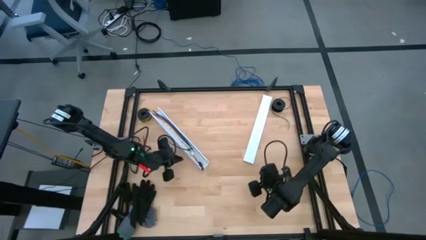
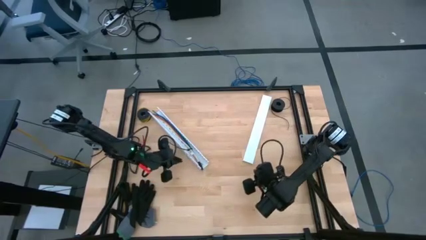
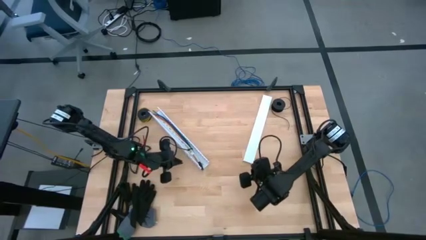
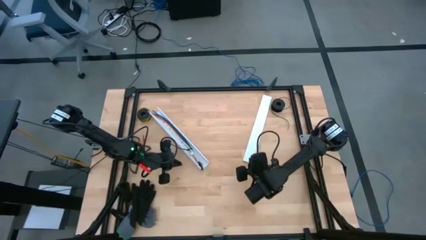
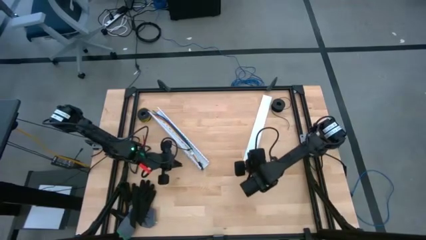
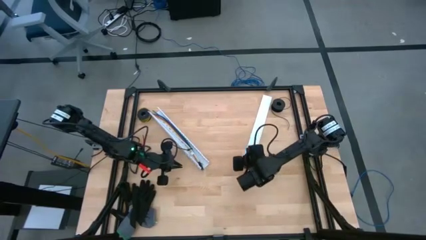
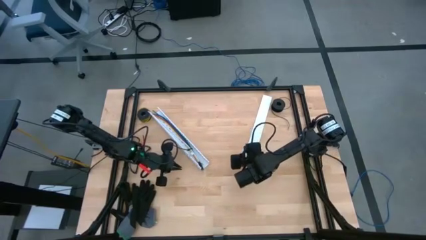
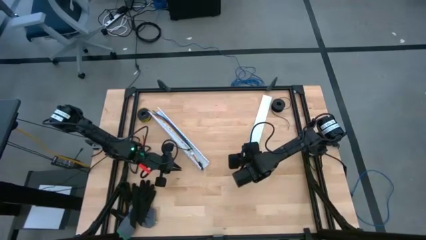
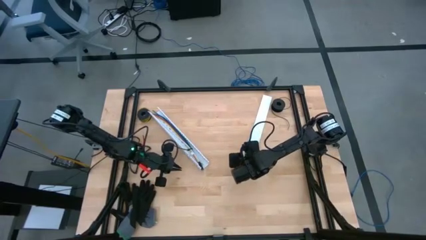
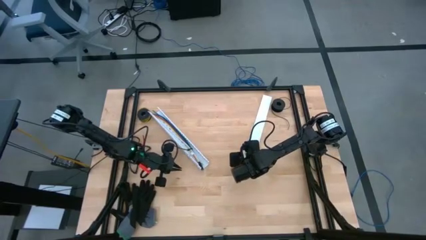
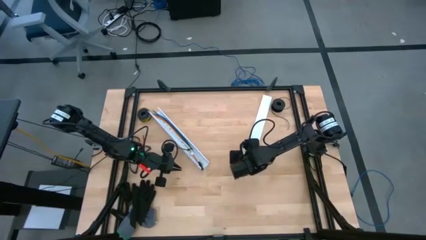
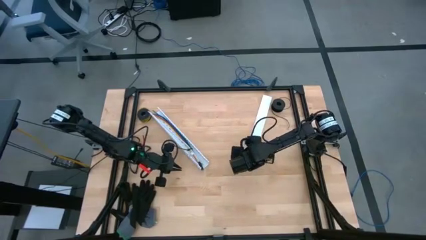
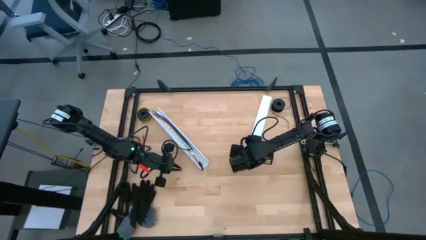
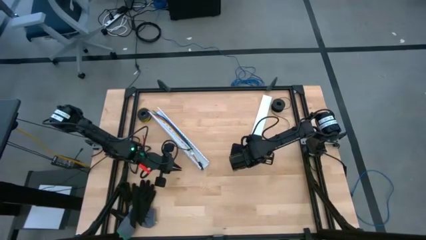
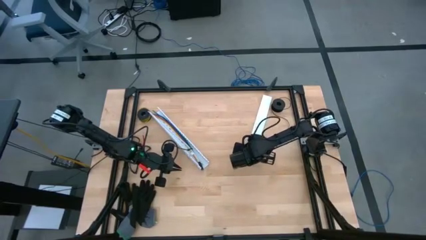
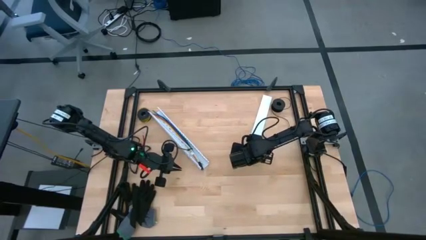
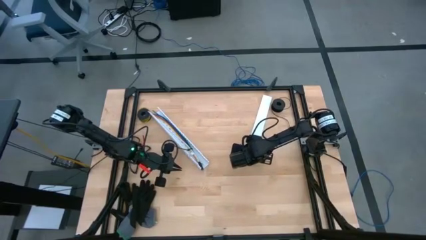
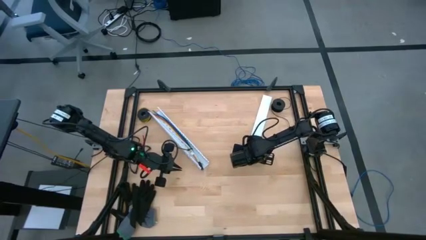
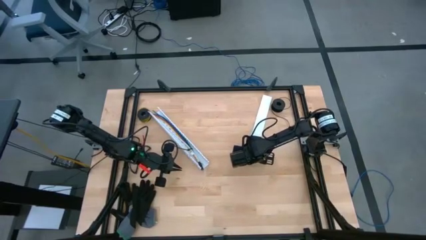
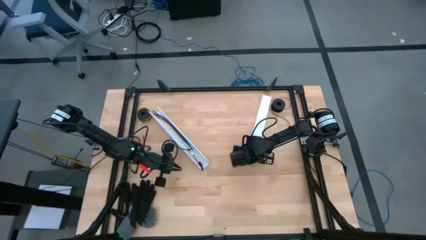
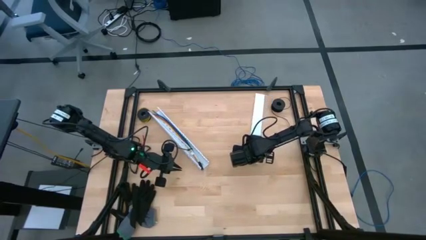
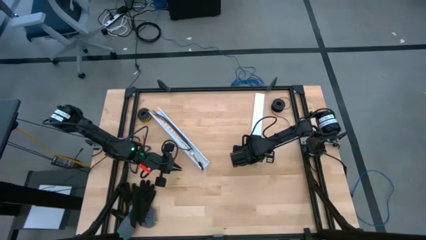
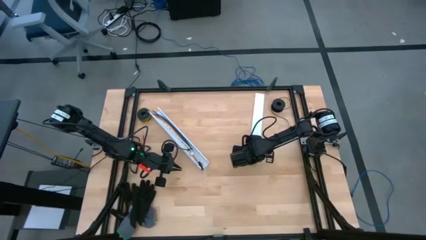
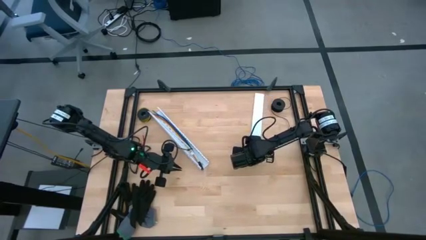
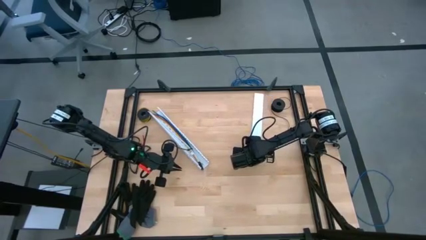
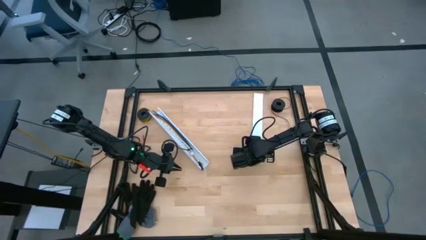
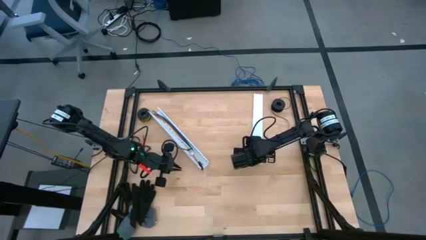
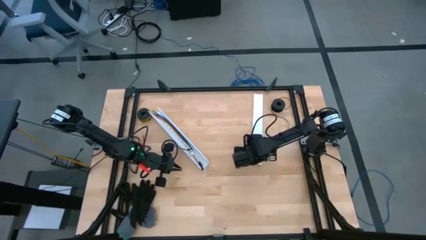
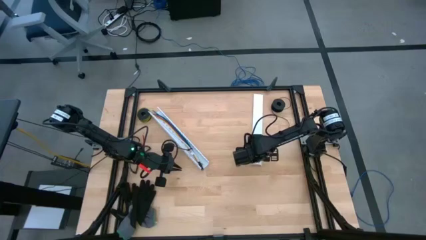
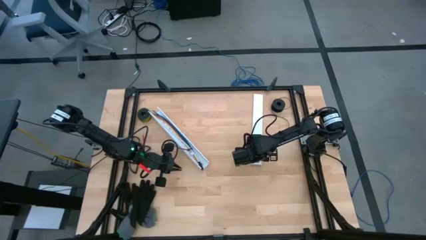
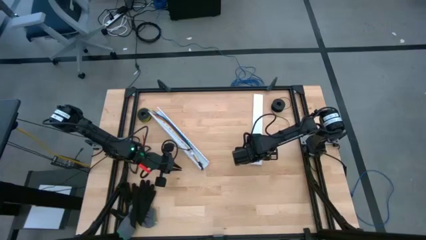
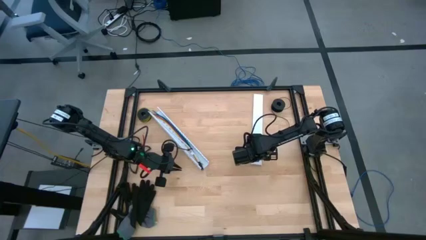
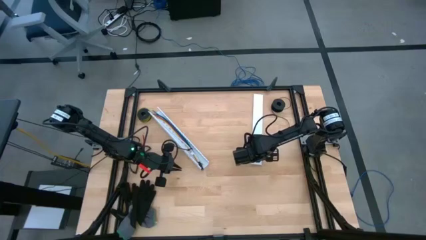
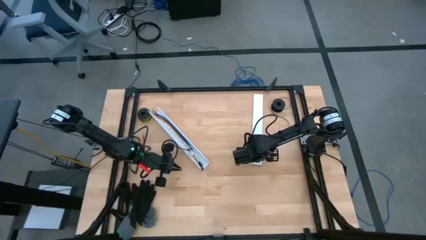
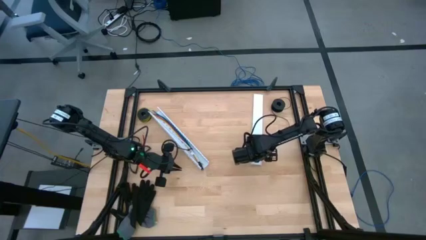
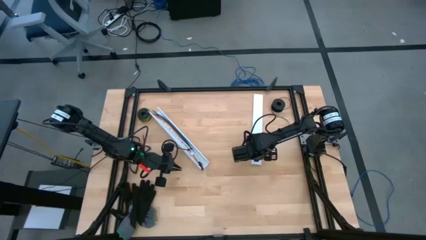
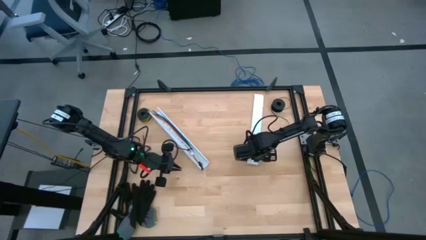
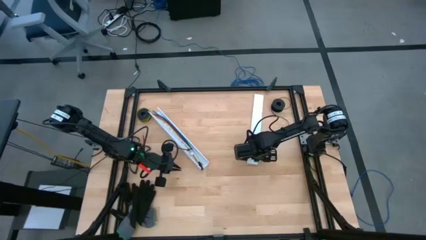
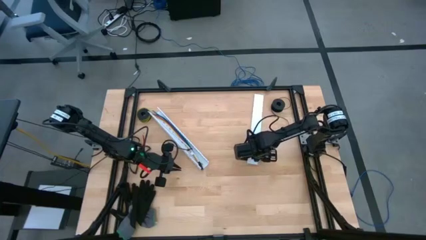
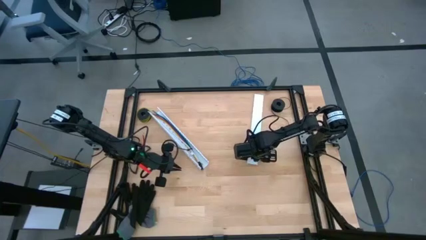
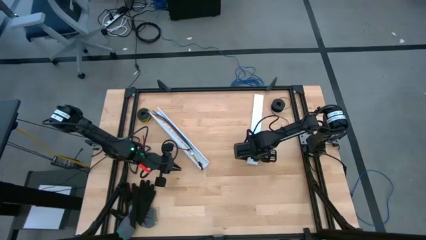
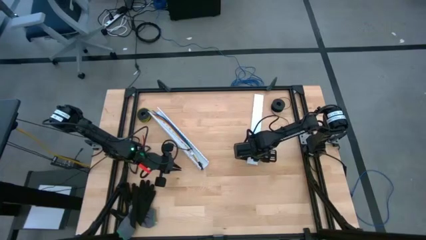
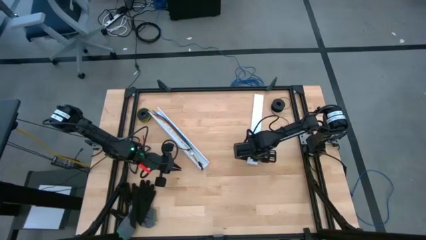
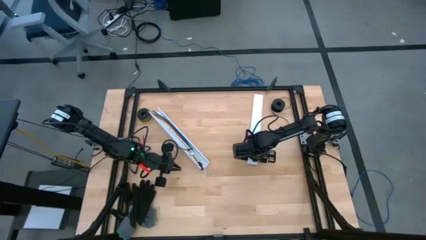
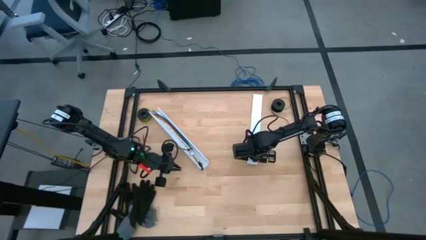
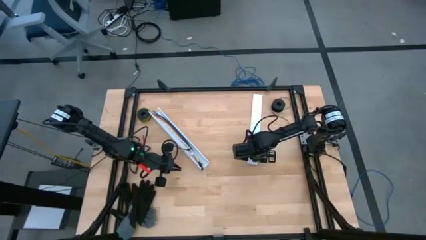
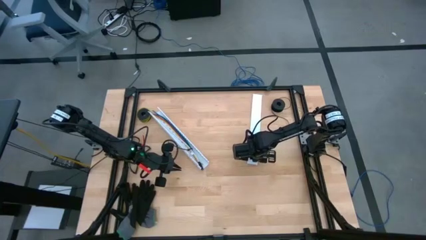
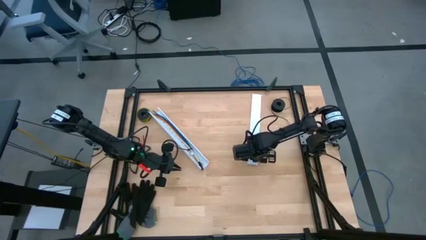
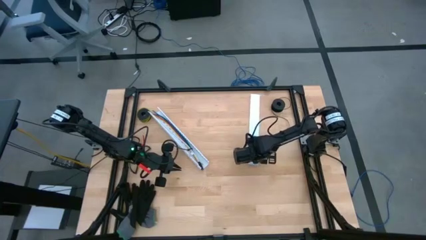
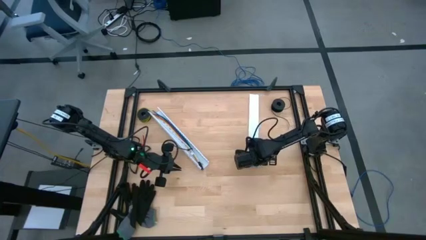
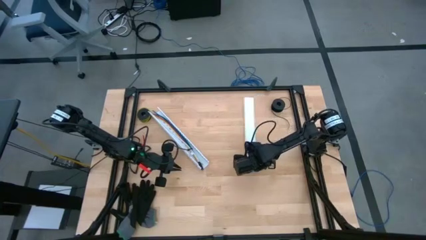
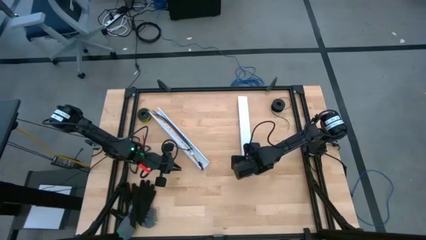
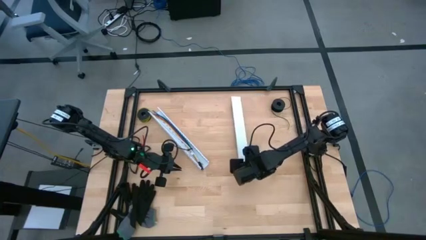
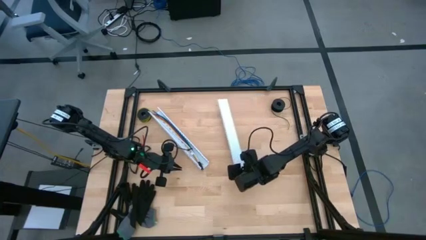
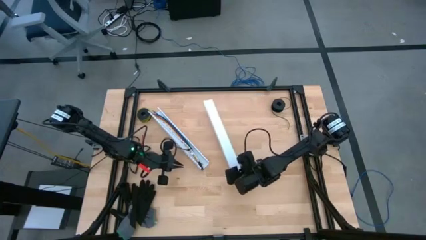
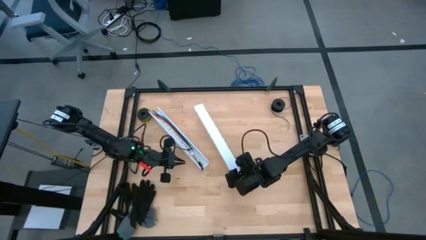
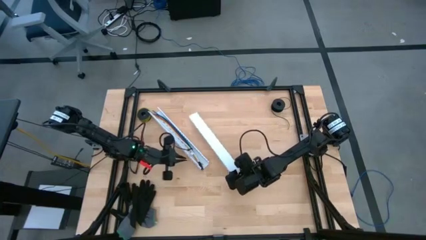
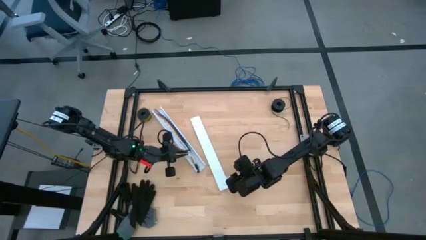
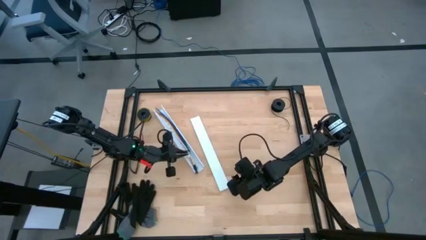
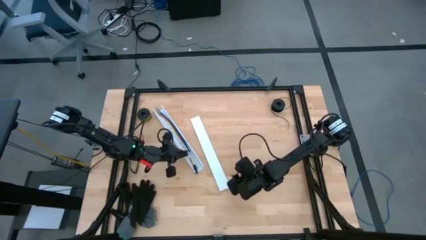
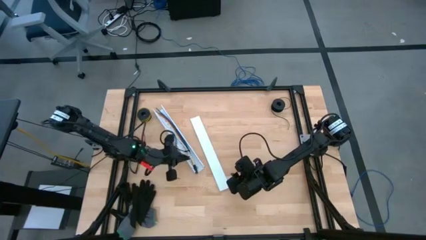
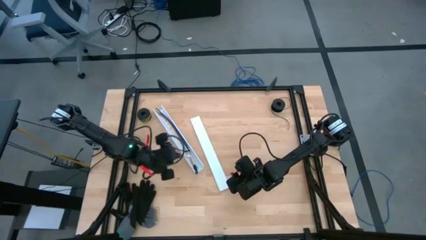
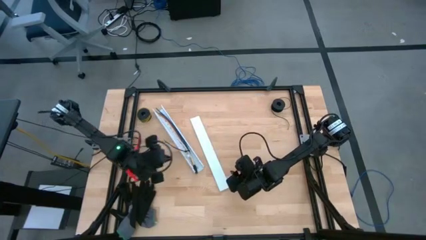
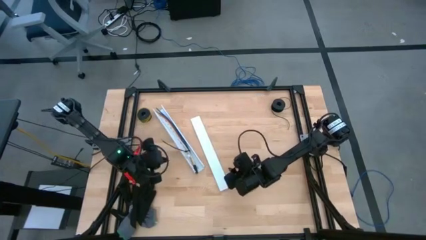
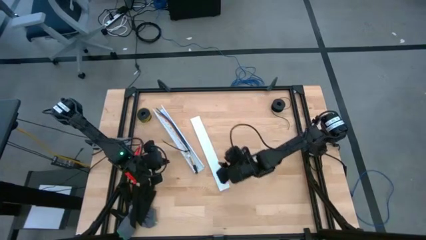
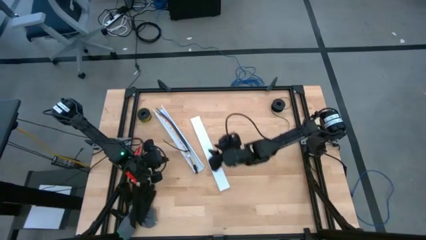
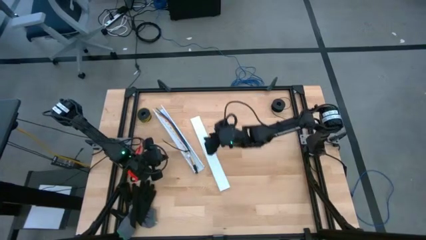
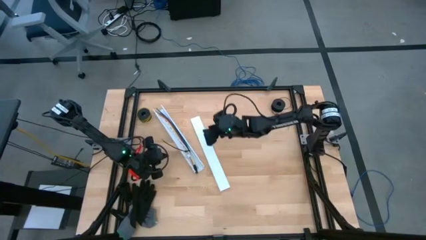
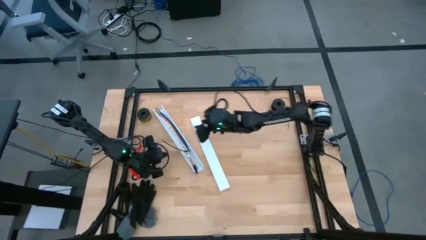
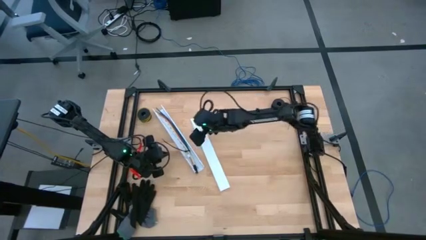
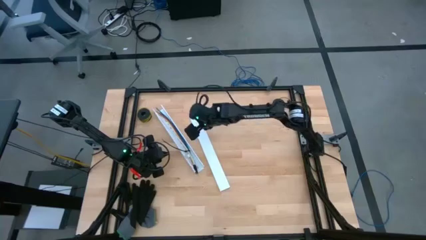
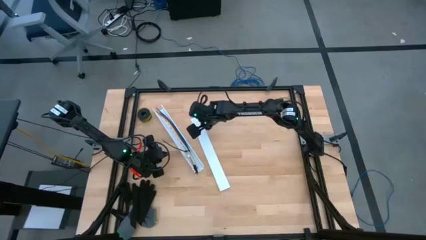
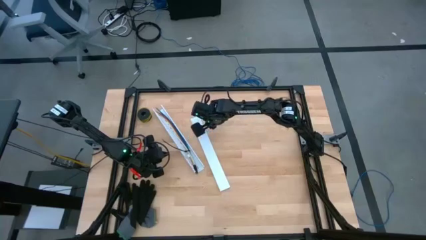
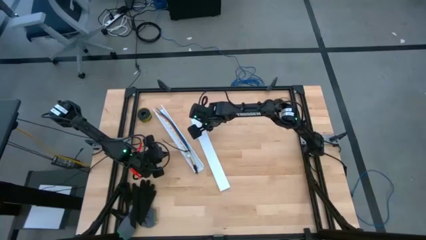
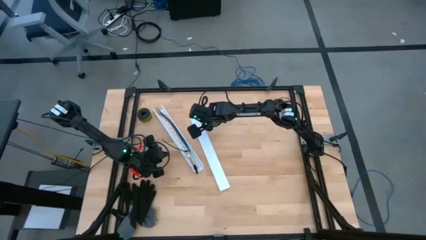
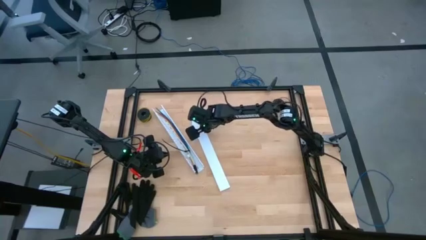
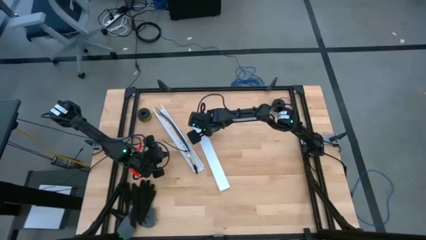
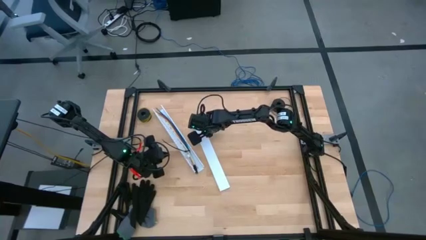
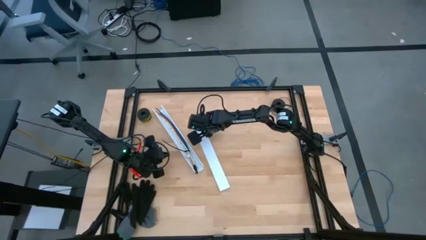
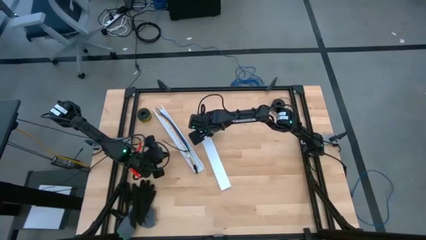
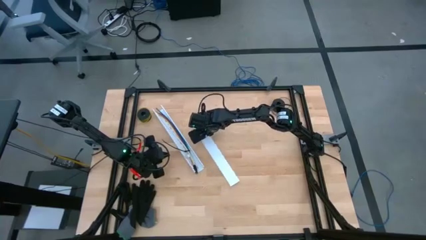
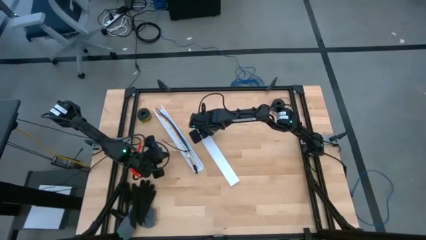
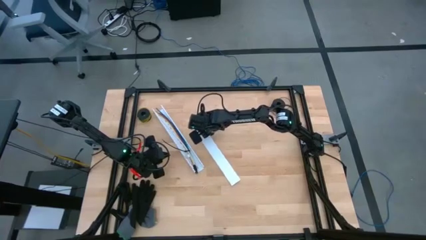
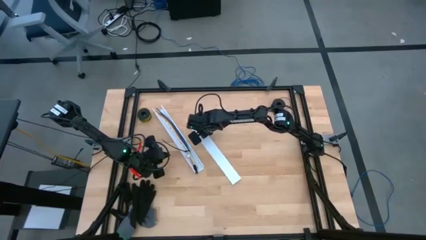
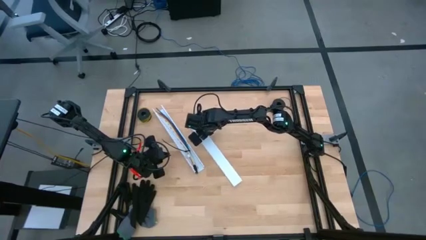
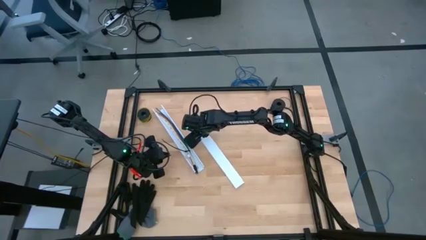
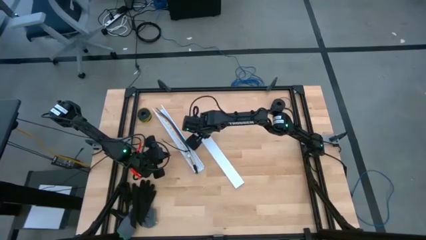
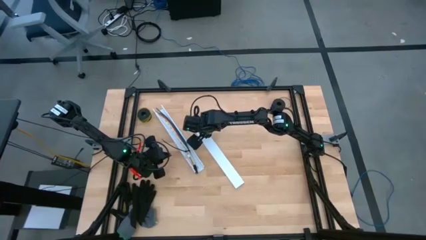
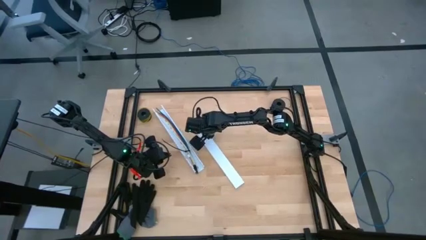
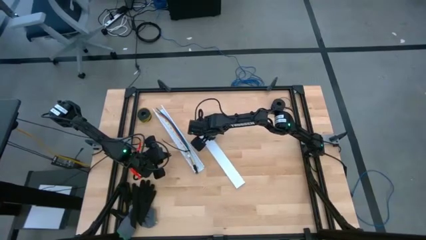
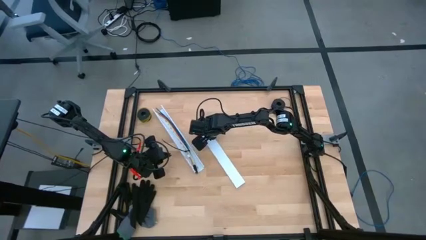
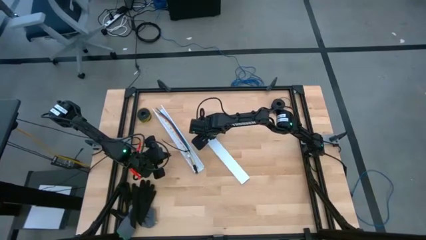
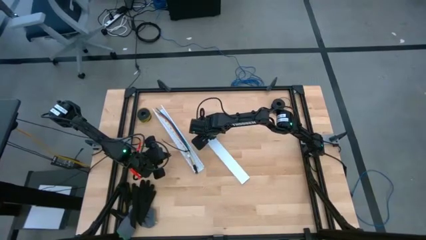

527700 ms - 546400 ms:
Task: Ziptie cables
Close the white cable duct
